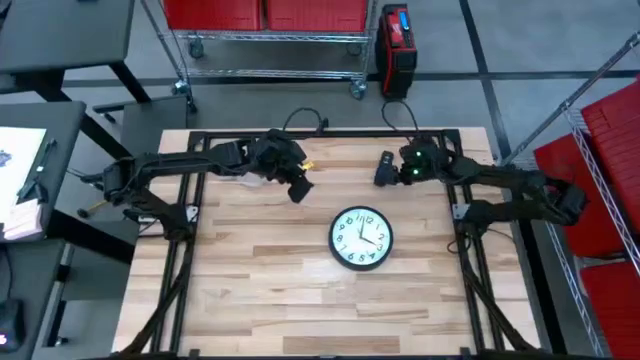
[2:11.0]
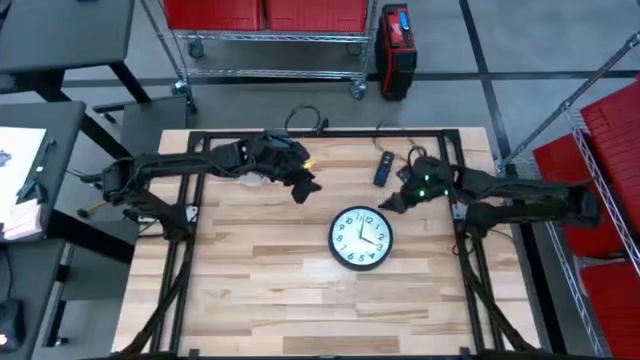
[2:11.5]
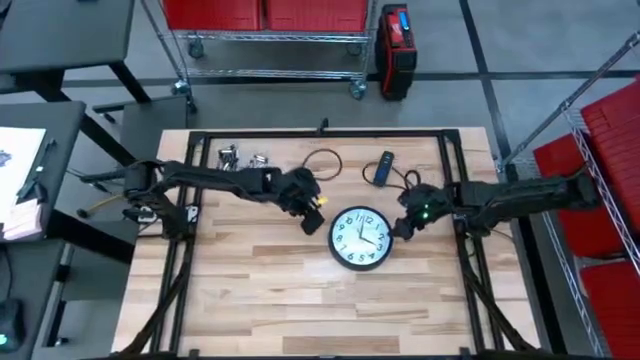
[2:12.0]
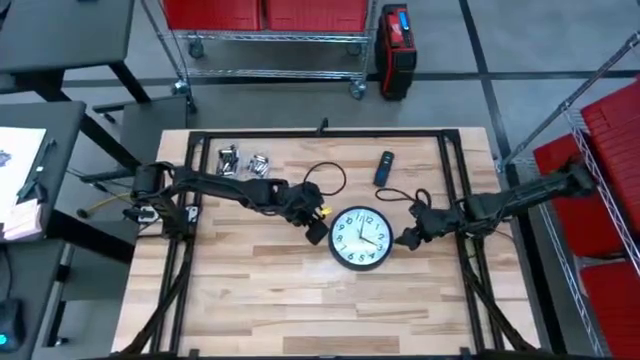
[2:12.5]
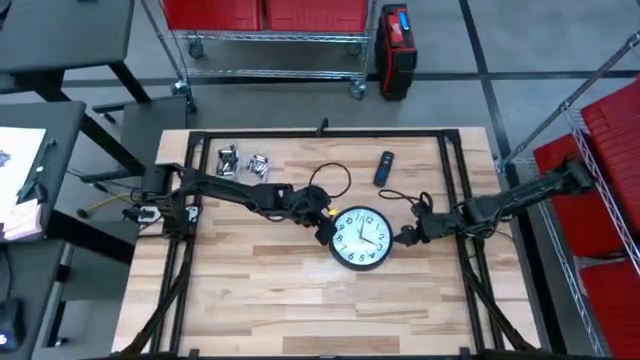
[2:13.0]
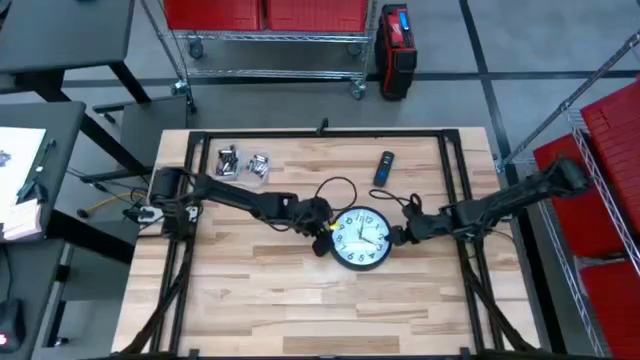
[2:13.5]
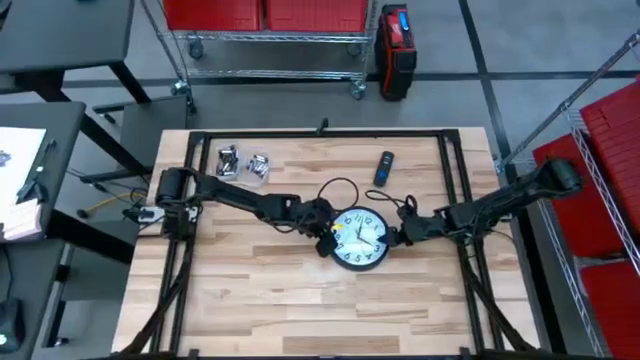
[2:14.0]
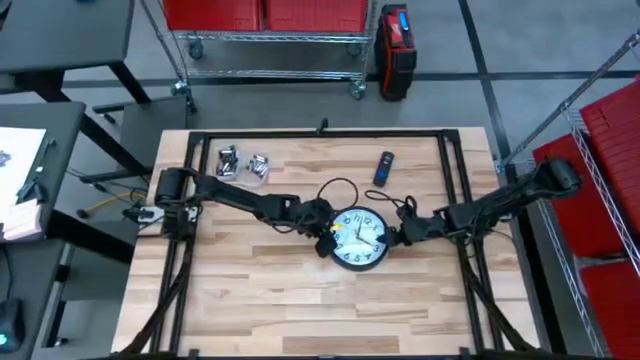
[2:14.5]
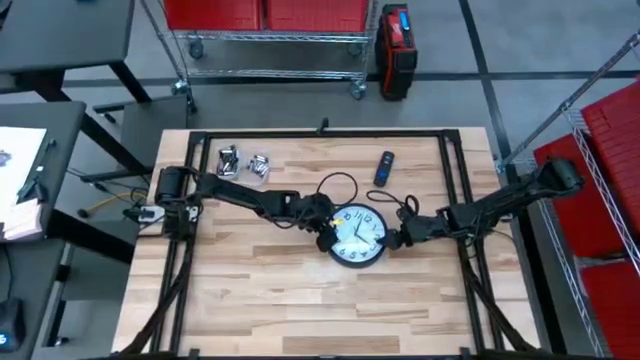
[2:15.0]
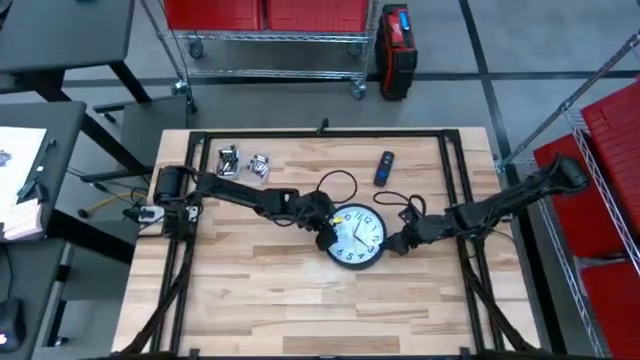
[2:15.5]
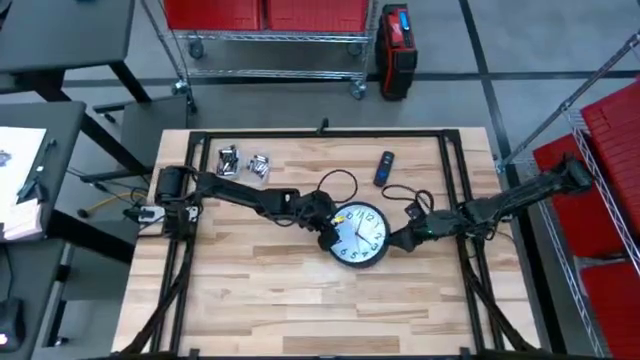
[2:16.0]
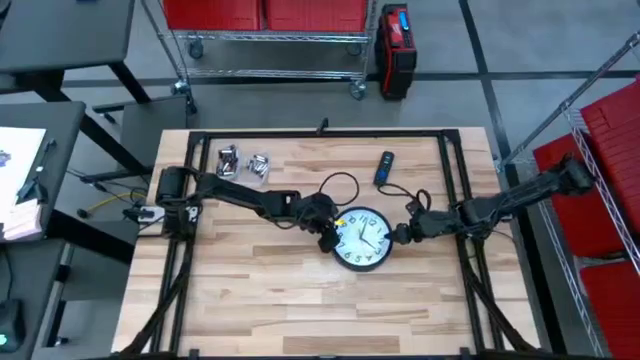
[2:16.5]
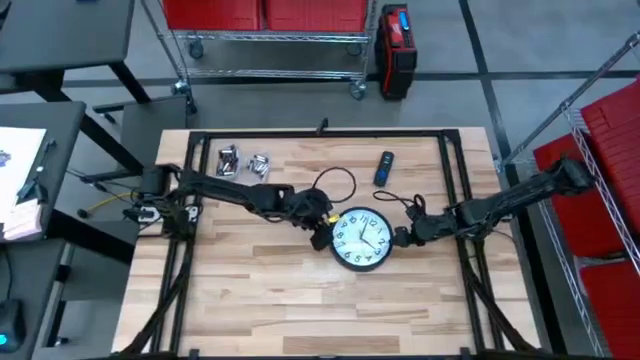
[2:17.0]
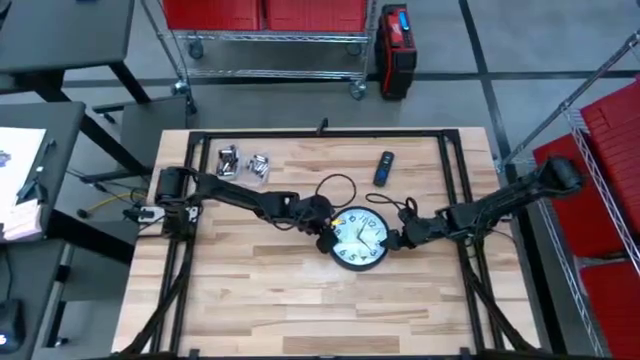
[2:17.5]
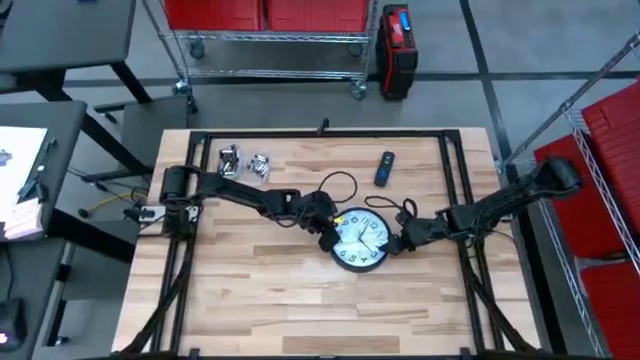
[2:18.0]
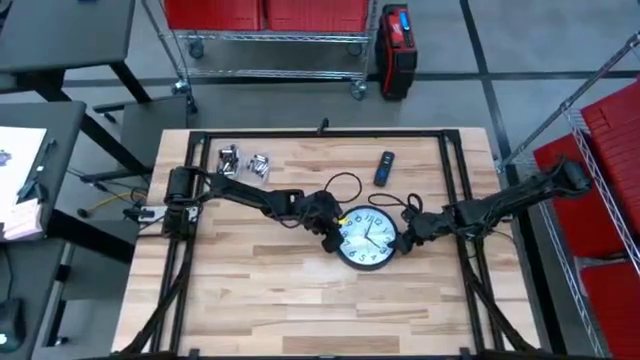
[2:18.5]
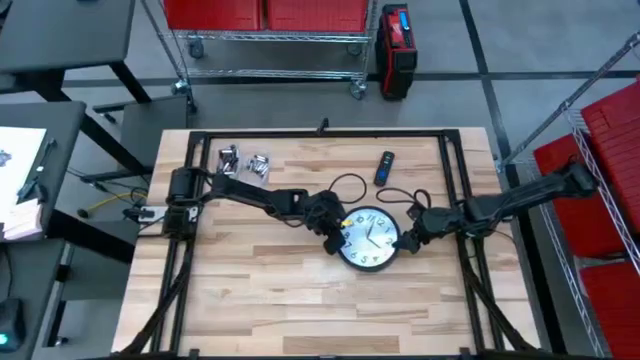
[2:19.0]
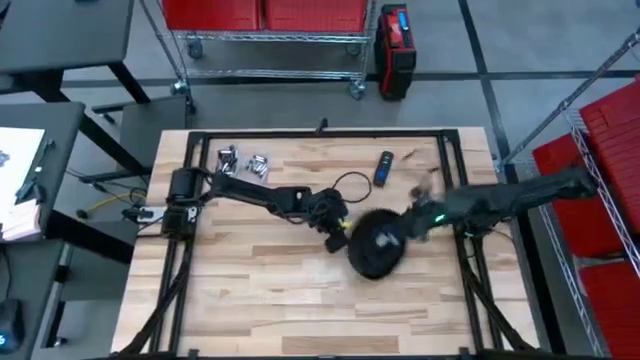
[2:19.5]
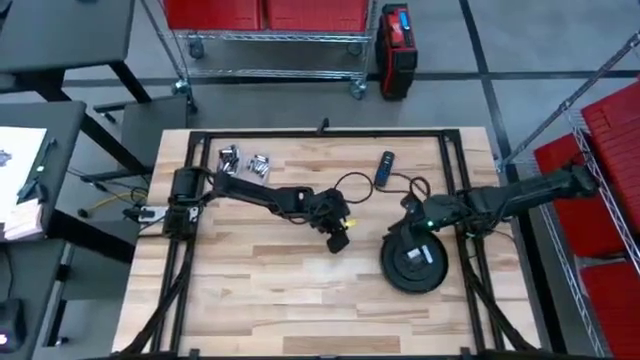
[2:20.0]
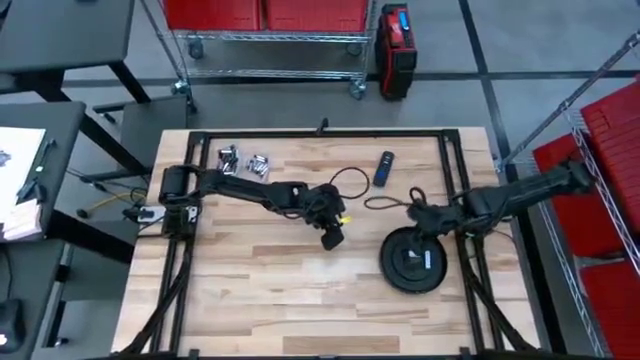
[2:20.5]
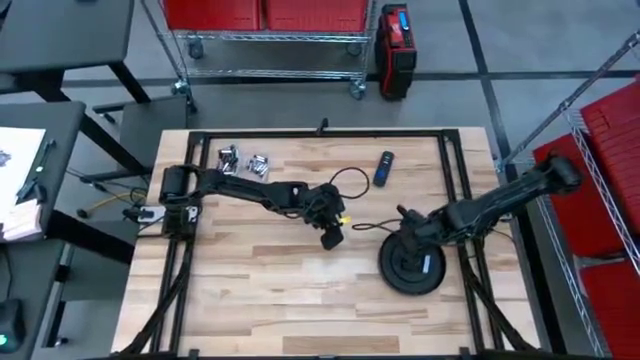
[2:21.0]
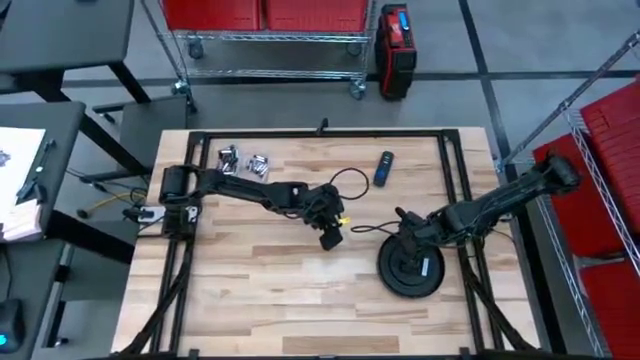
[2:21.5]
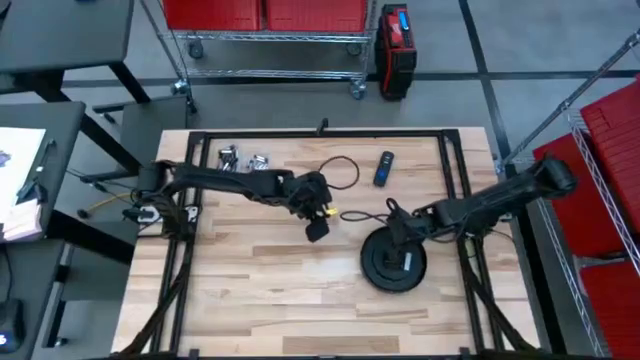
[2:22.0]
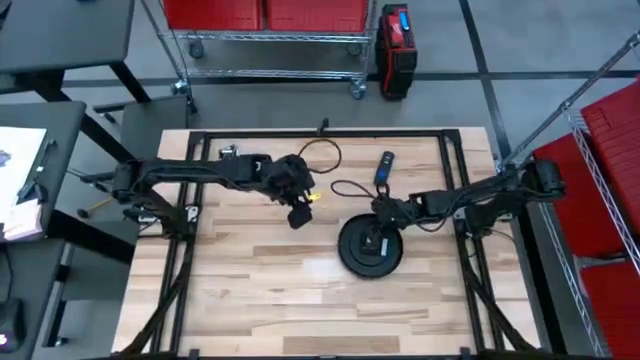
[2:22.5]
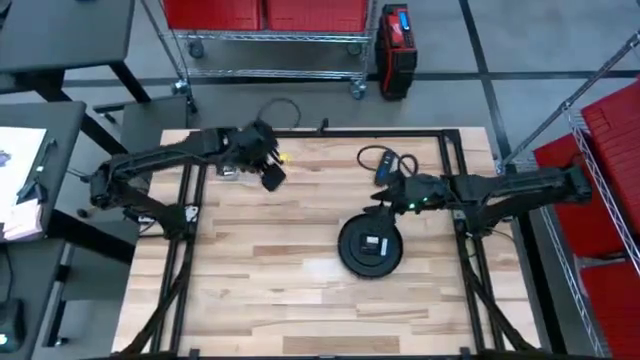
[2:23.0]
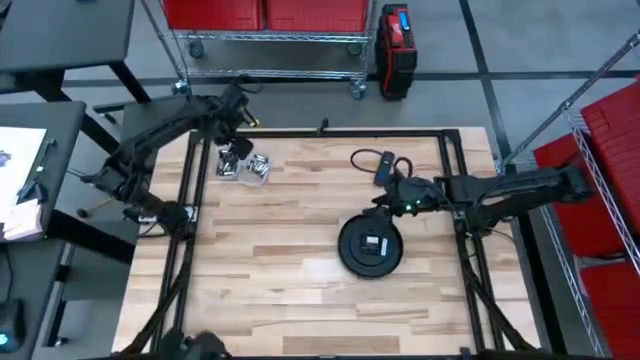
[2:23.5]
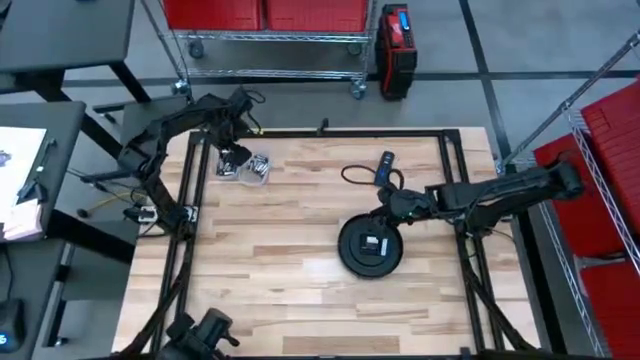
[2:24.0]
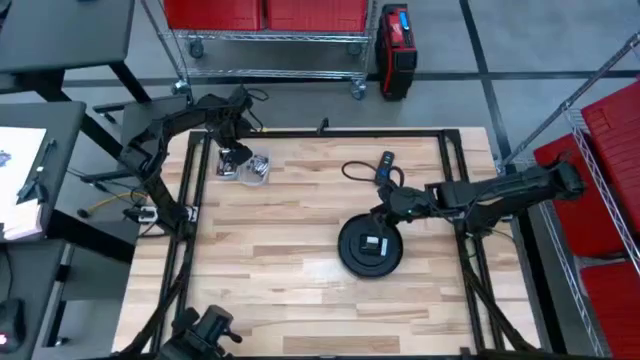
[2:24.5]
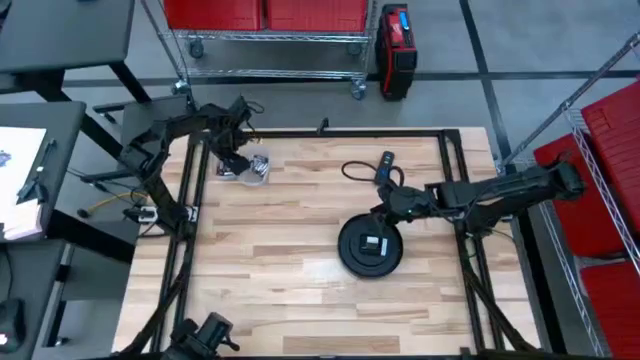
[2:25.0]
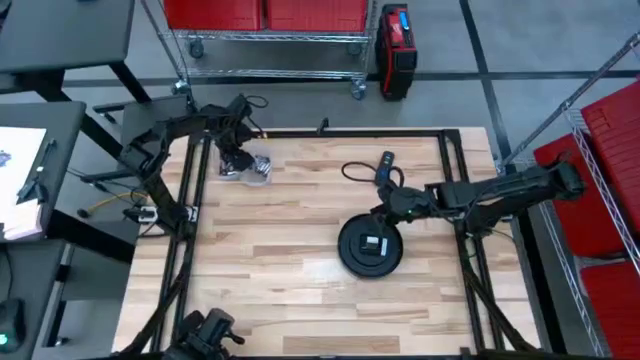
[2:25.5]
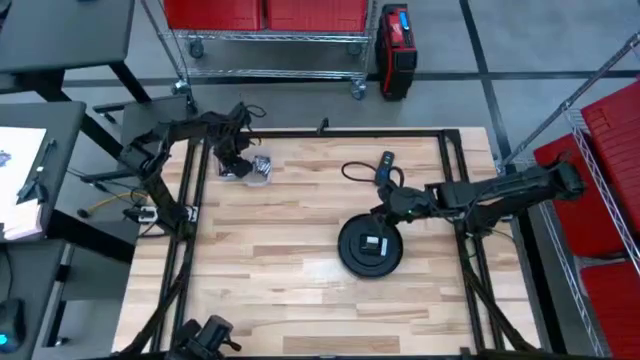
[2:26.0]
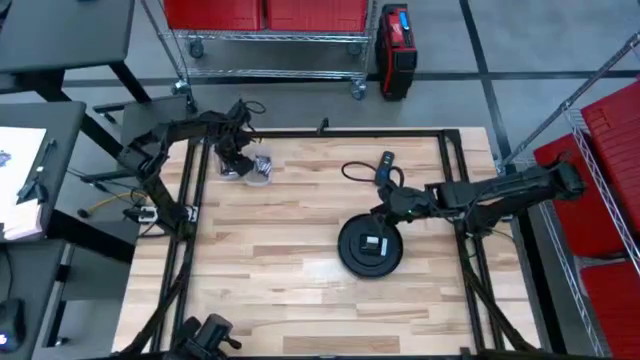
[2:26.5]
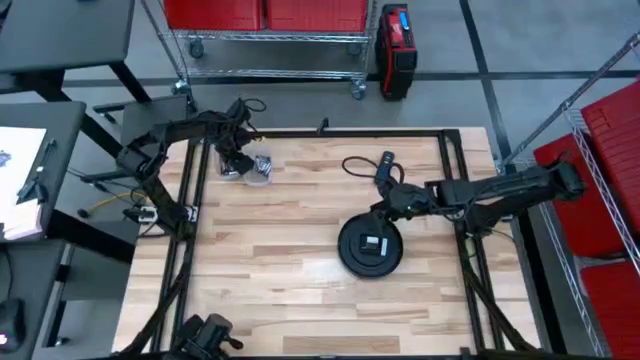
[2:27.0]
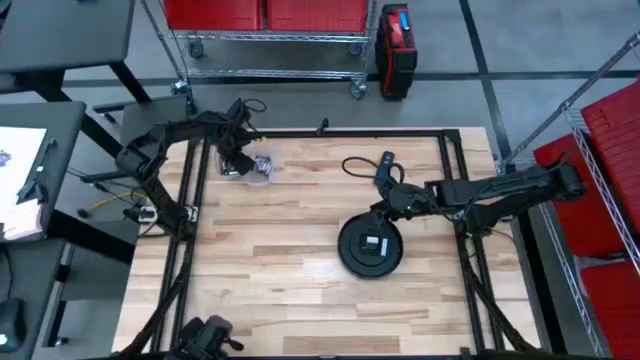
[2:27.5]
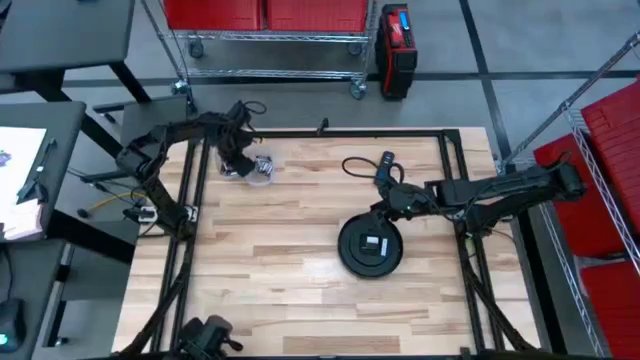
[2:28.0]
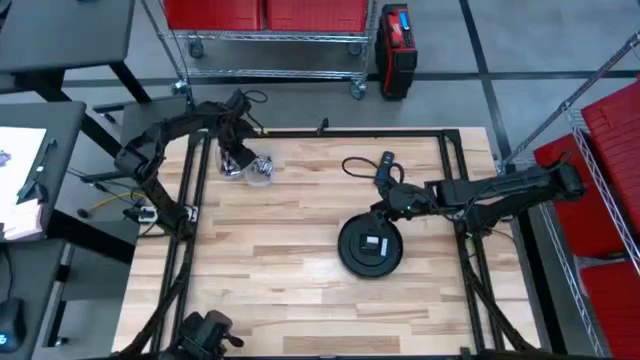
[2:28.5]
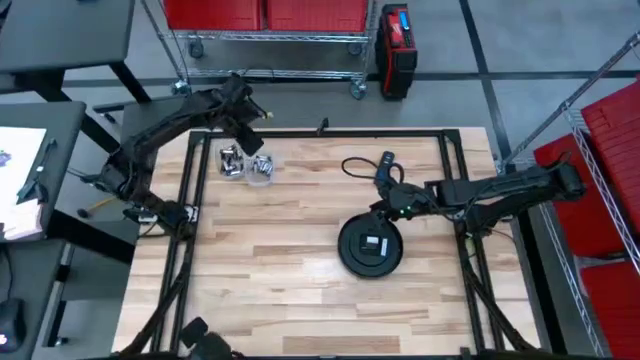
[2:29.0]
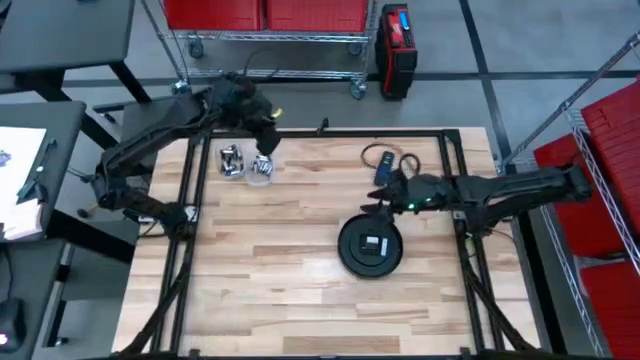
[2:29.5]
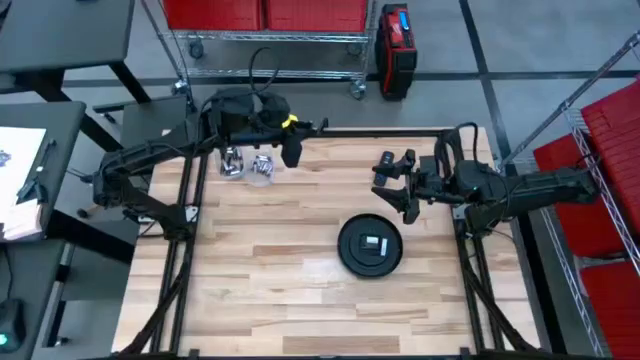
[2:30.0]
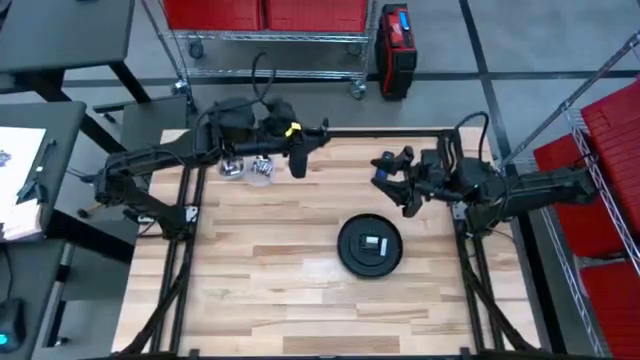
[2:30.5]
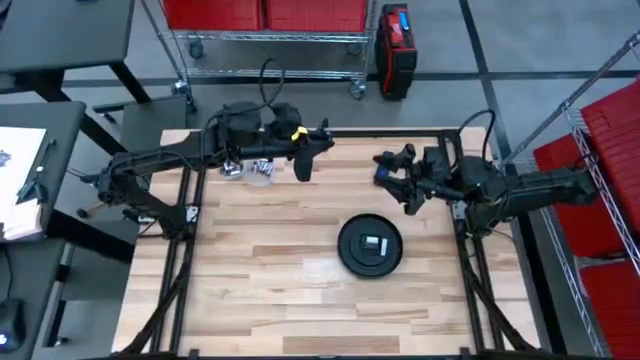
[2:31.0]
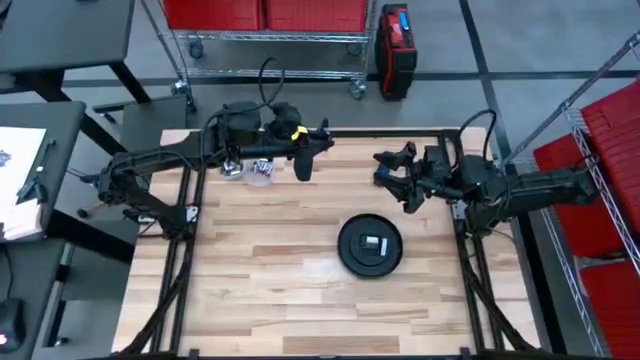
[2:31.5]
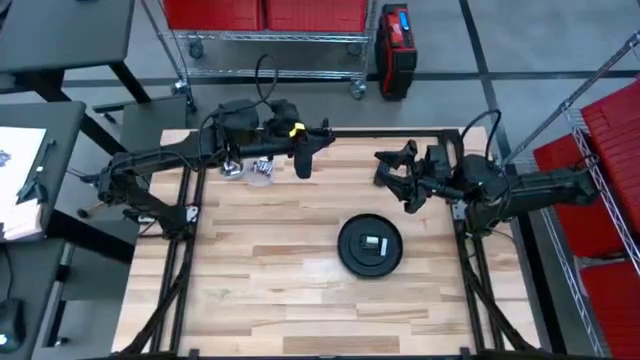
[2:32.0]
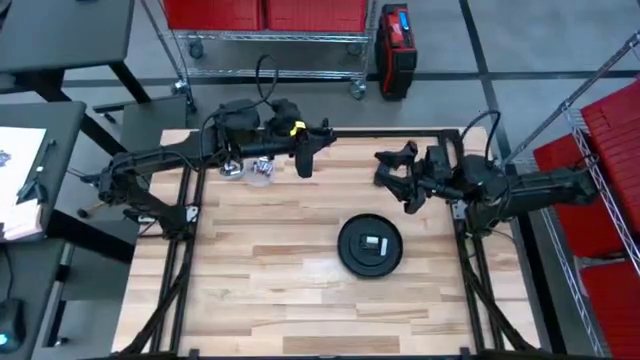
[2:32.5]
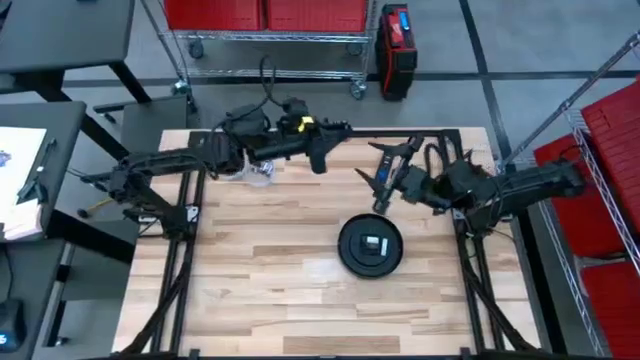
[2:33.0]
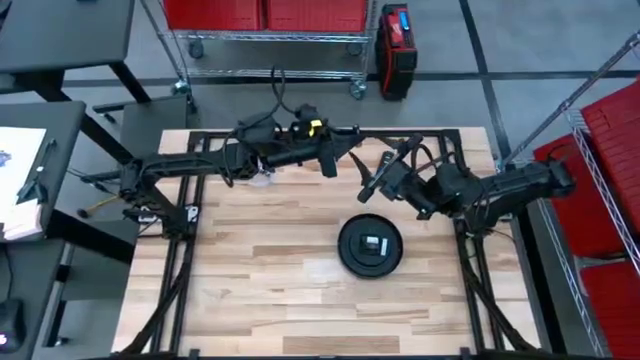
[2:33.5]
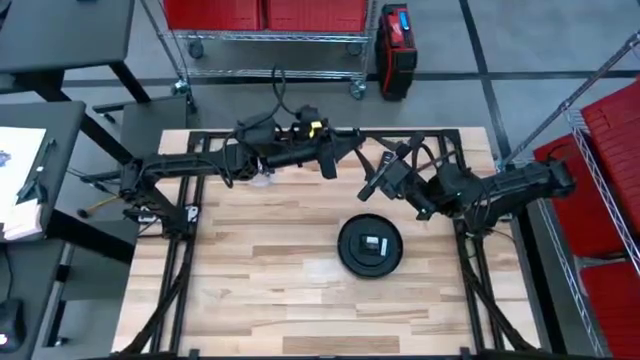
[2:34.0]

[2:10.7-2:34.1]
Task: Insert battery
Insert the brown battery into the wall clock
